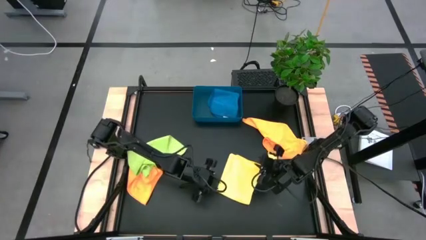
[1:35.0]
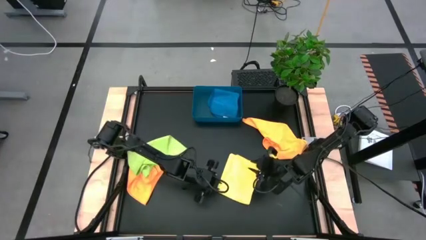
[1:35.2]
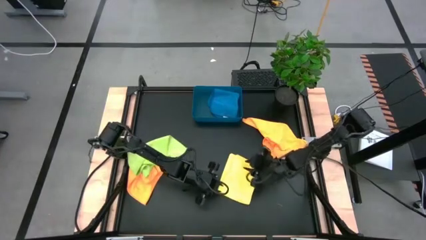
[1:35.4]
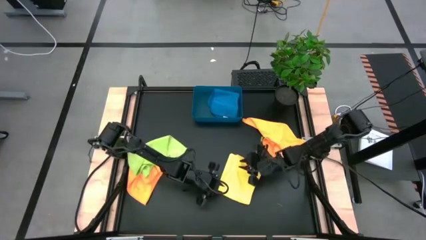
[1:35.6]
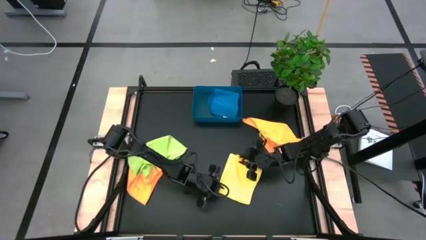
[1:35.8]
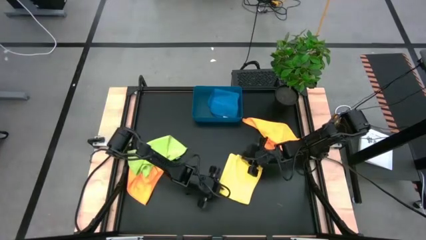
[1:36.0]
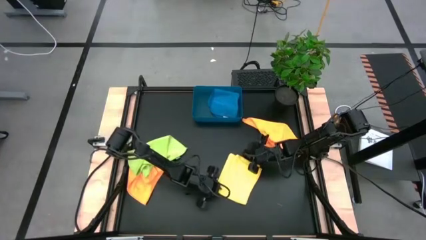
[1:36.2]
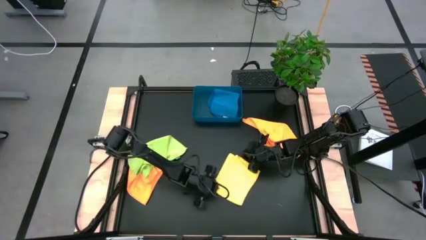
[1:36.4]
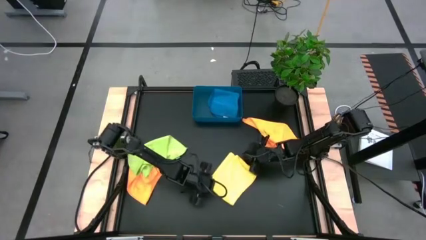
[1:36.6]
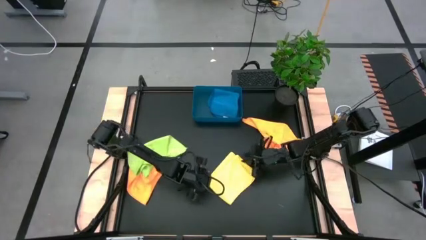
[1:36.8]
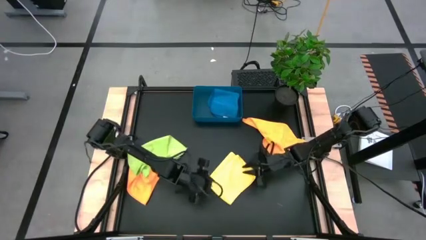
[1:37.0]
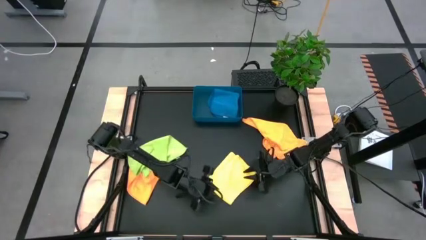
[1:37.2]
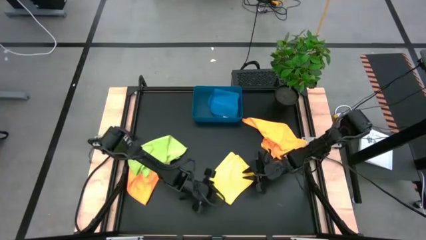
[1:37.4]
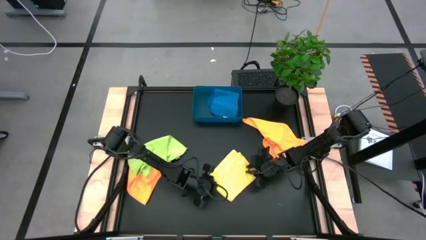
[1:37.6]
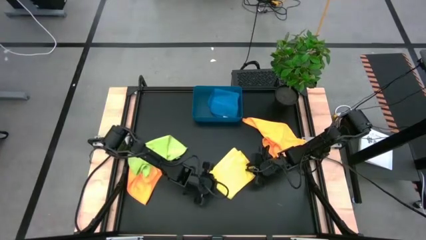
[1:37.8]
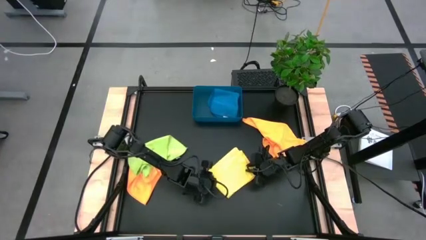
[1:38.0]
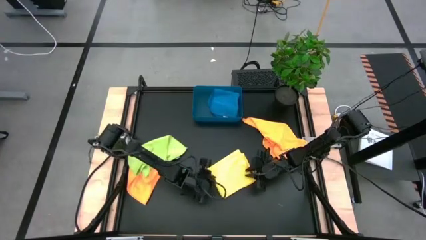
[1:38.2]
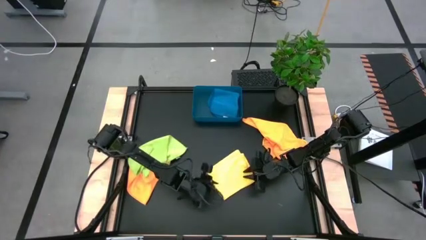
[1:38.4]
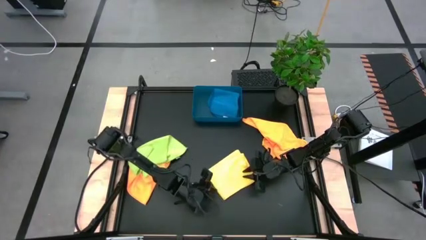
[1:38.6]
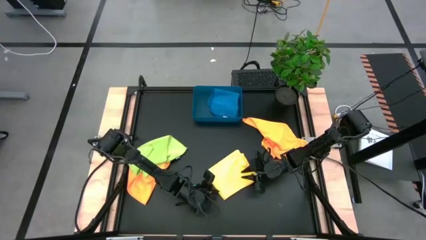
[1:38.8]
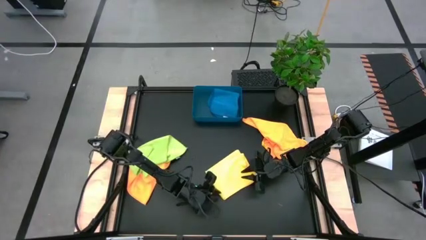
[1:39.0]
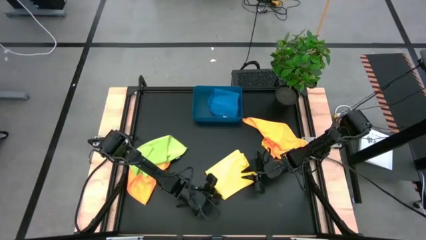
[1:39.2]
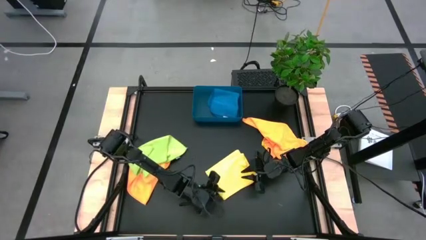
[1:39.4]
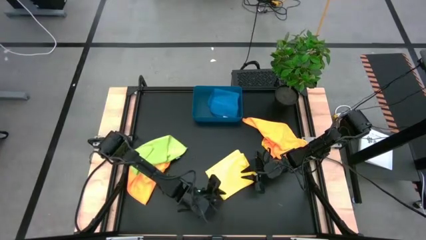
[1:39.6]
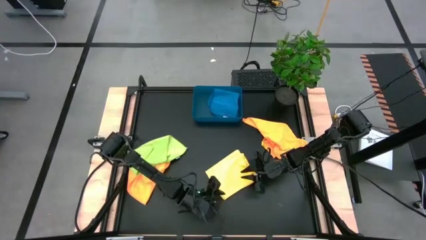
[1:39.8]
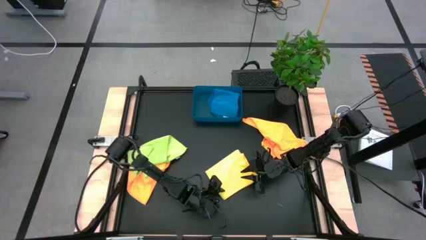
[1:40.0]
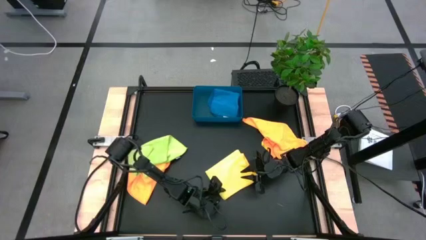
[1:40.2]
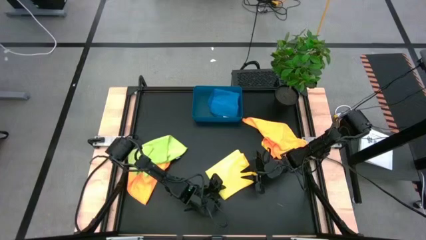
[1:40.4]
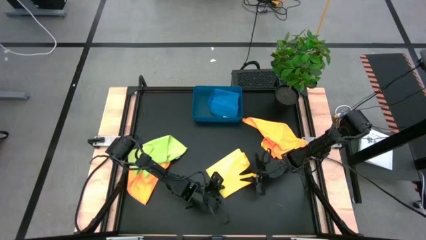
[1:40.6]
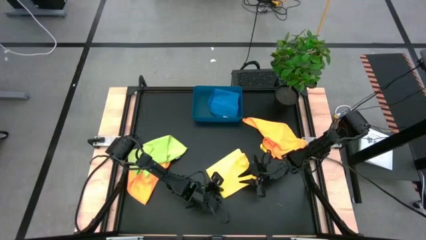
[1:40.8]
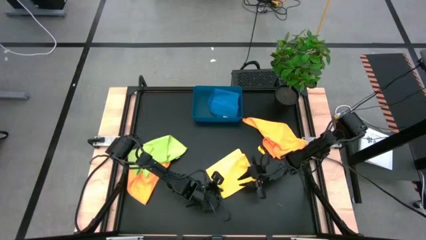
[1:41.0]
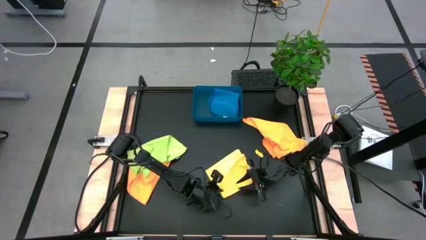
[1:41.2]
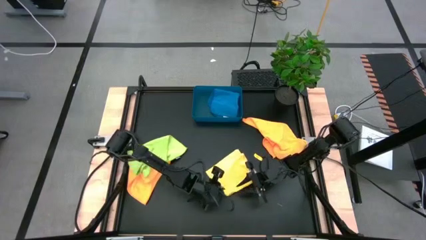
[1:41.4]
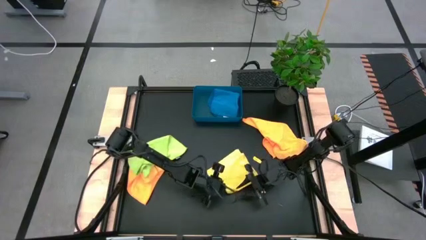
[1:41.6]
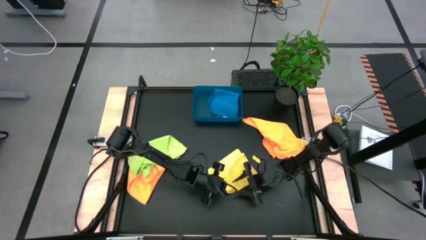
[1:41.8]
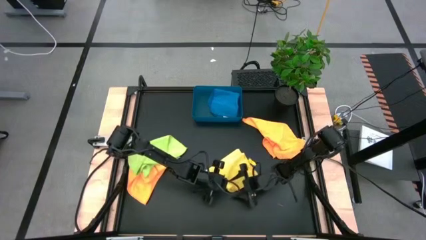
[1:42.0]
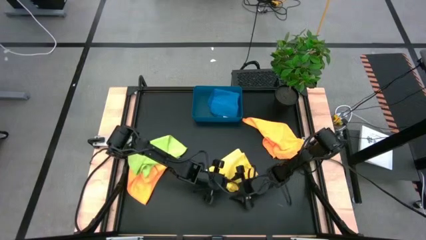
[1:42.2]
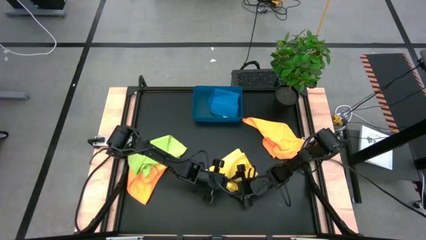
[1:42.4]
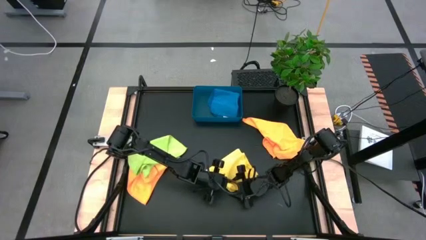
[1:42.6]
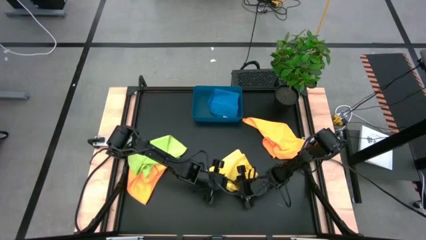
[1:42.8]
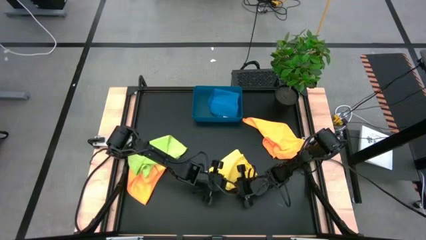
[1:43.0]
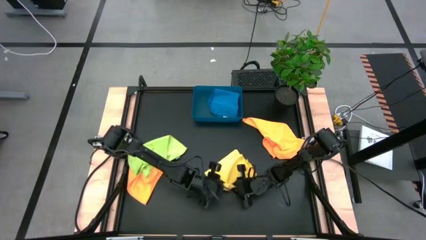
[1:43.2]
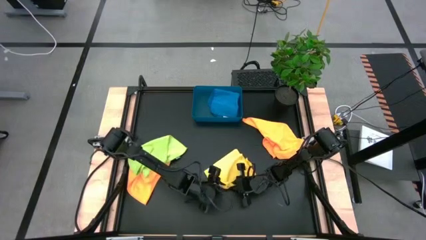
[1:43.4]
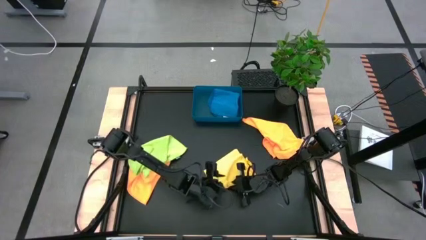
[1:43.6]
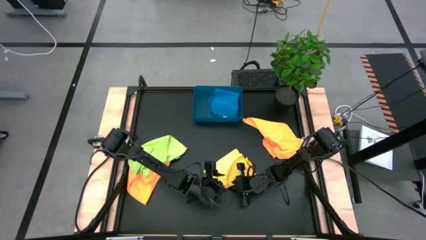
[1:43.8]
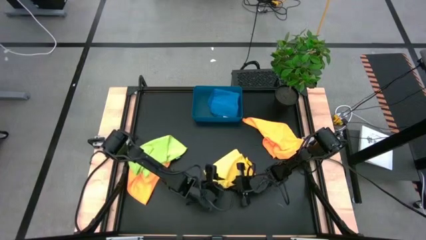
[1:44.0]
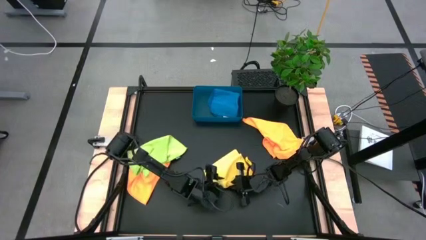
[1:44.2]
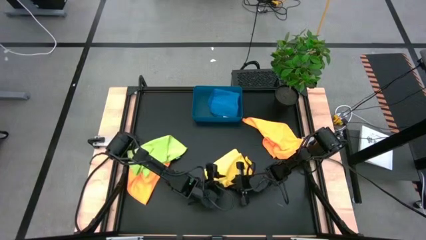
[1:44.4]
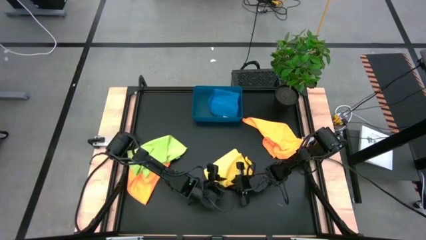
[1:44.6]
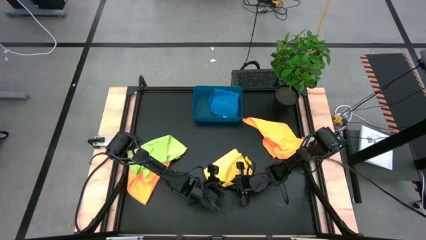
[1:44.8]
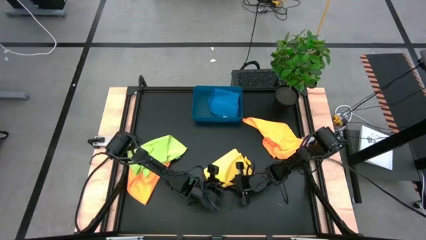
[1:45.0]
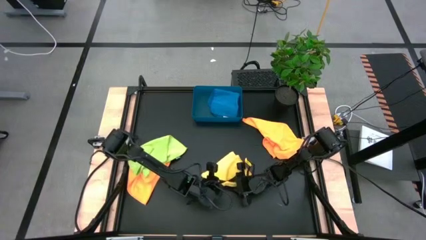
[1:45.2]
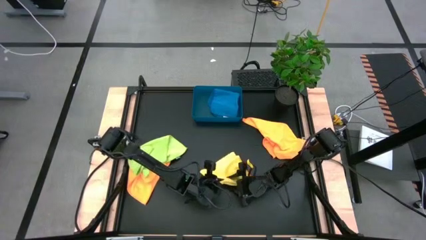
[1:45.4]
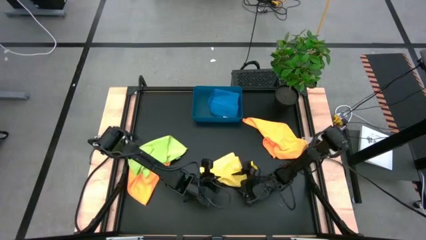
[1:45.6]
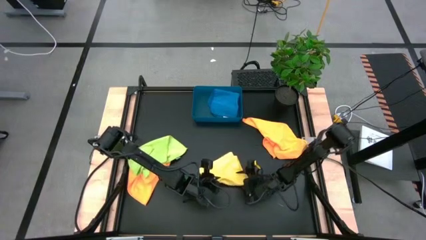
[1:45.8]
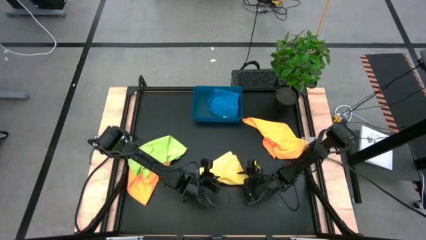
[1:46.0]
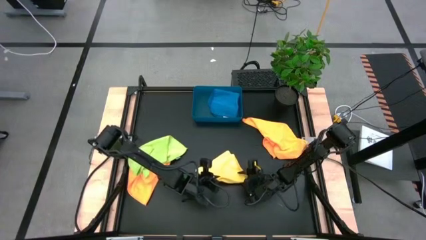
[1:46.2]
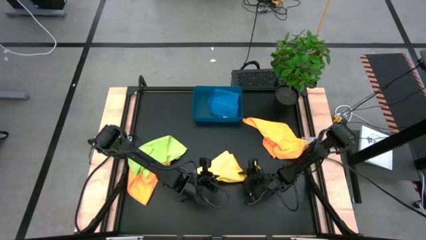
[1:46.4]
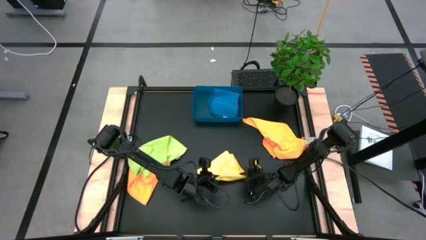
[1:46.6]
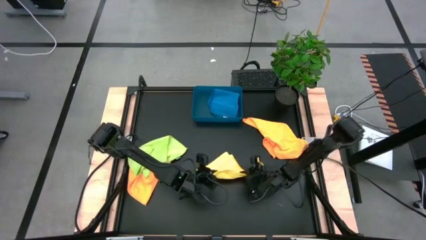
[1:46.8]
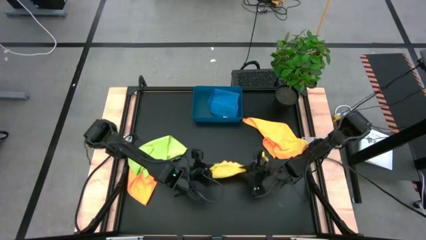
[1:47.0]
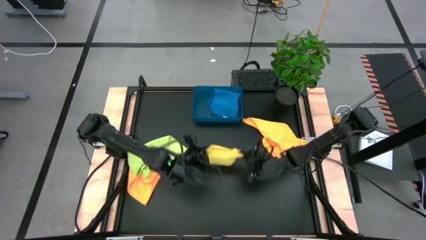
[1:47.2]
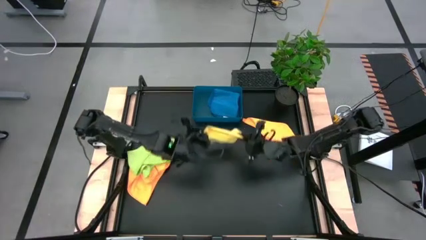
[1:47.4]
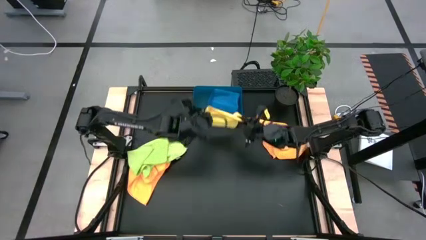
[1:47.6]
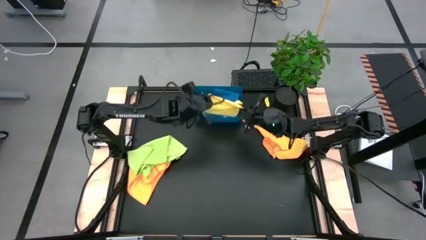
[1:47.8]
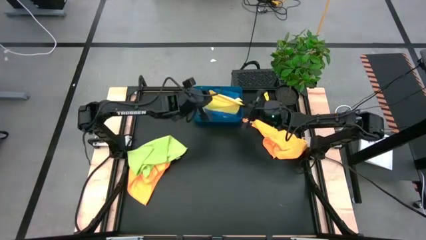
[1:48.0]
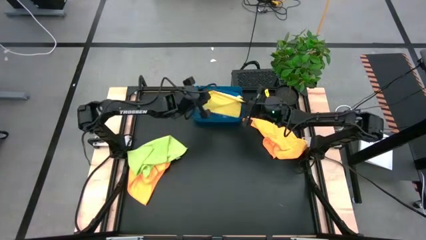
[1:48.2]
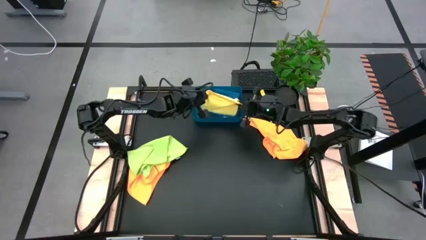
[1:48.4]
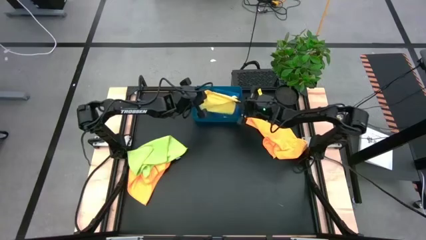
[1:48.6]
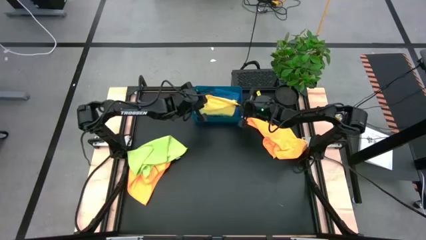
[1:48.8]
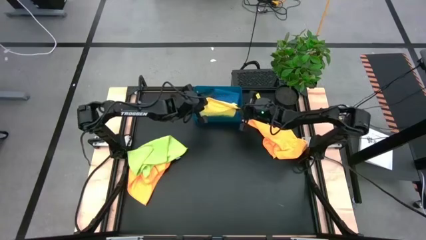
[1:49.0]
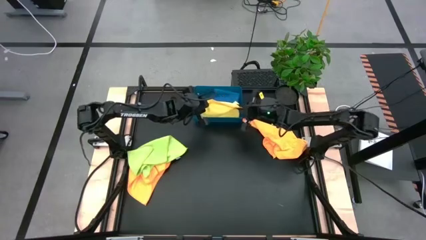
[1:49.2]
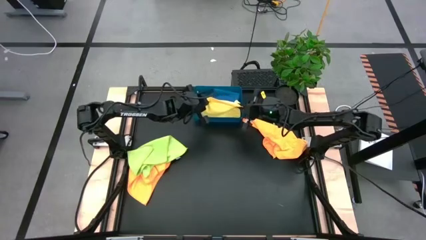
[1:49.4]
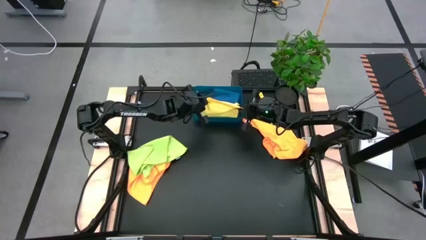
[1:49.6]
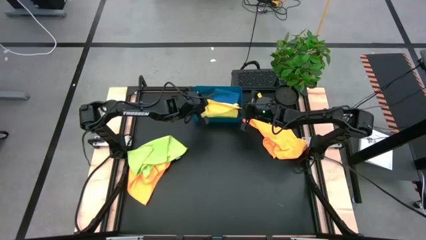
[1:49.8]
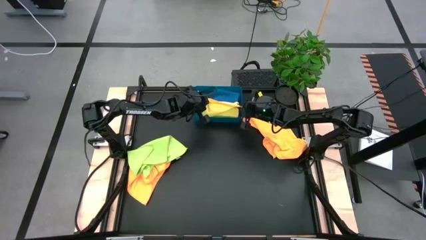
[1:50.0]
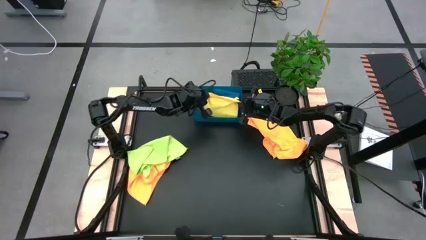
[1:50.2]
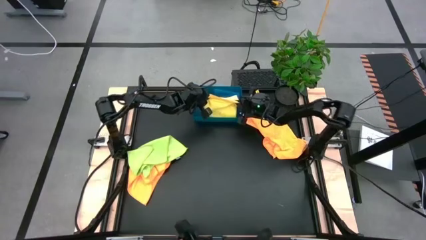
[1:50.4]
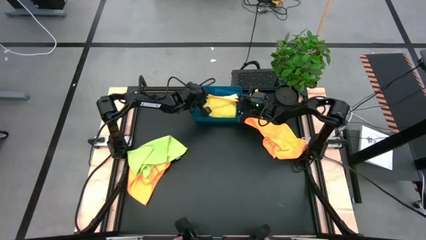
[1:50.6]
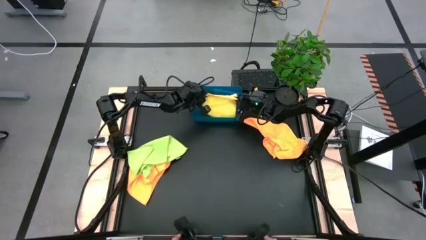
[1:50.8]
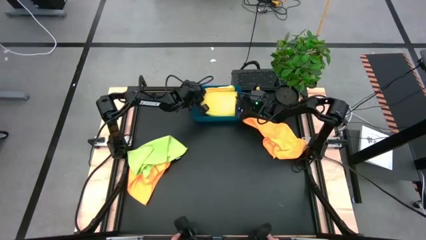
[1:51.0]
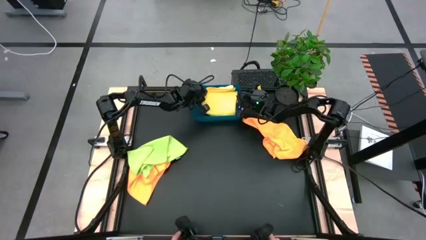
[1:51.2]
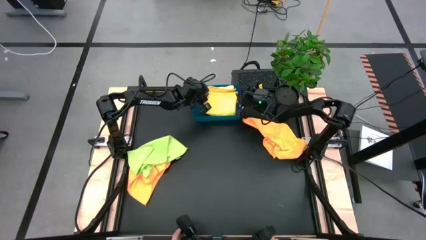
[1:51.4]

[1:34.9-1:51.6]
Task: Fold microfiber towels
Stack the yellow microfiber cloth on top of the blue microfiber cloth in the blue bin
